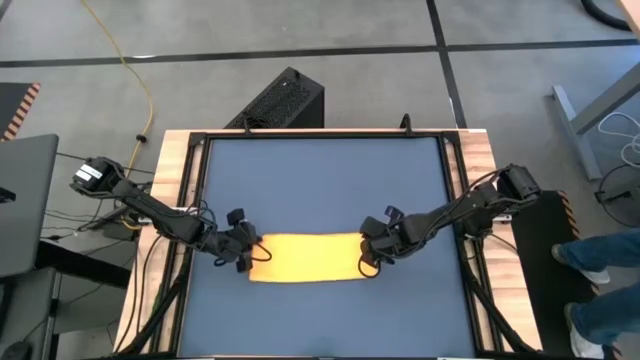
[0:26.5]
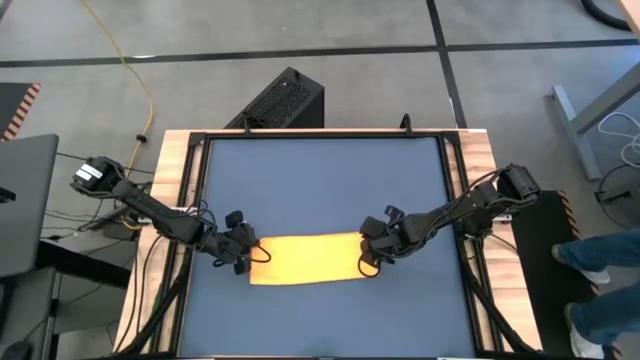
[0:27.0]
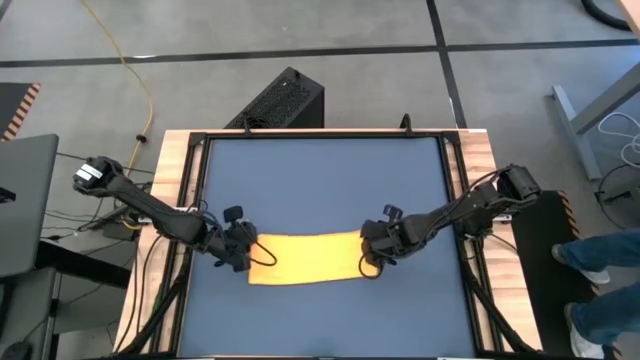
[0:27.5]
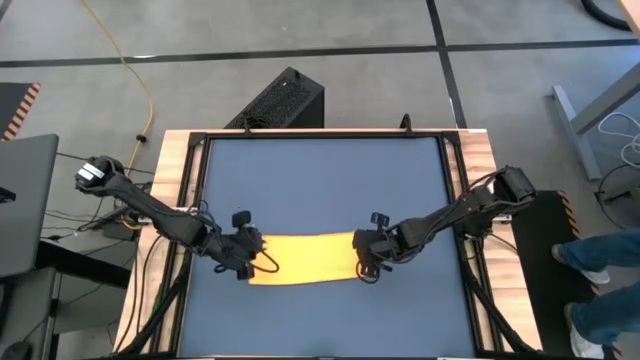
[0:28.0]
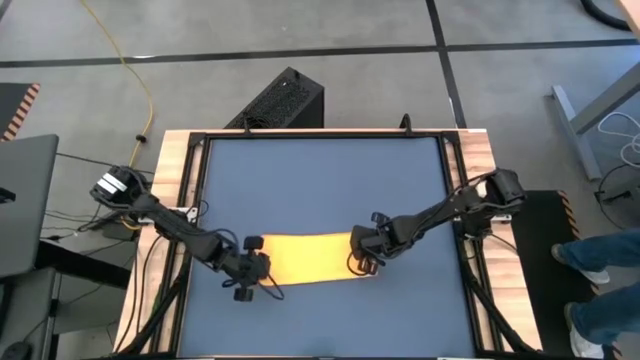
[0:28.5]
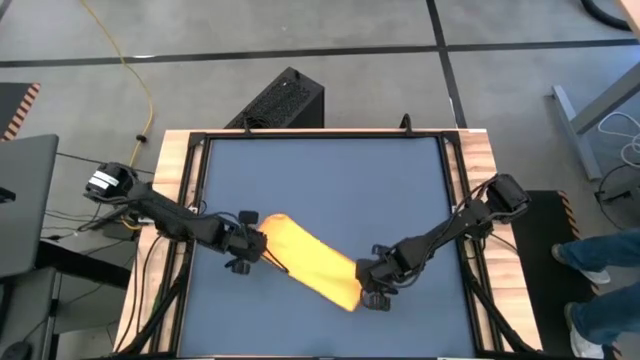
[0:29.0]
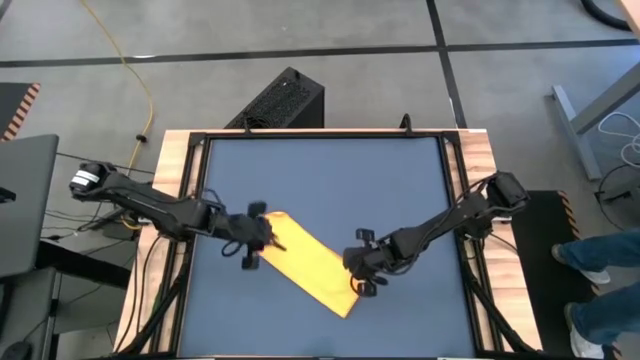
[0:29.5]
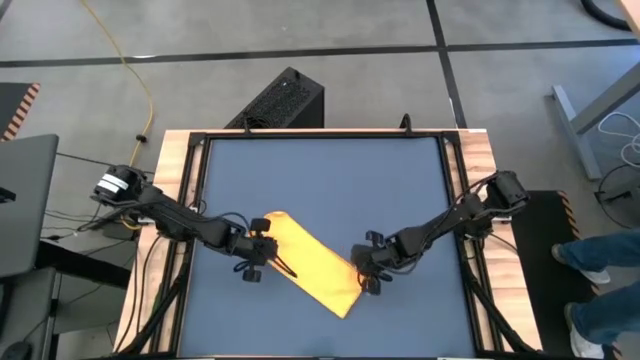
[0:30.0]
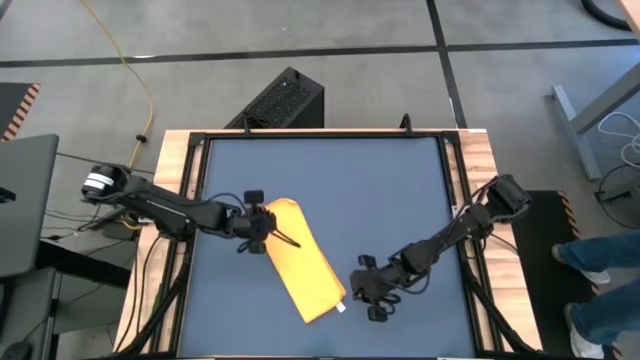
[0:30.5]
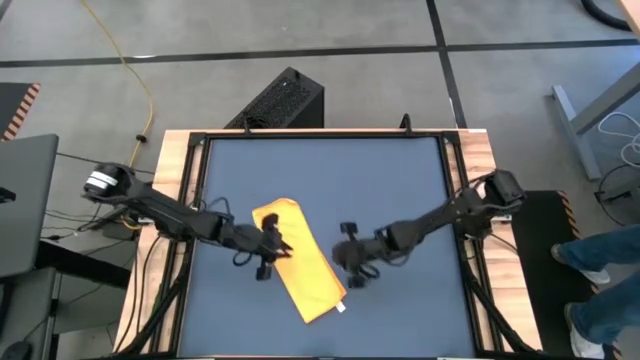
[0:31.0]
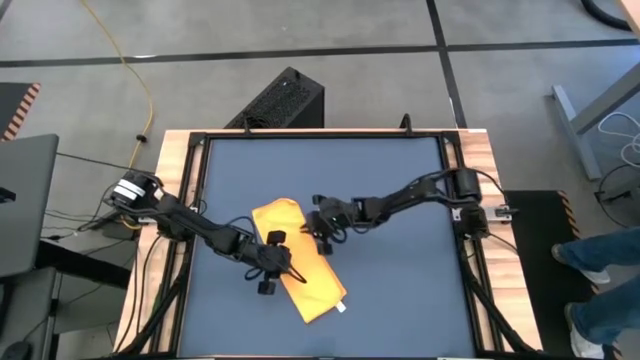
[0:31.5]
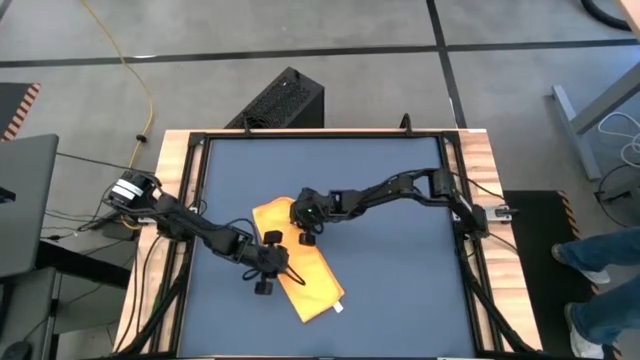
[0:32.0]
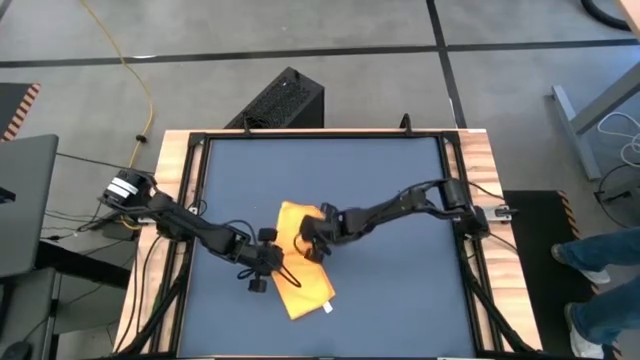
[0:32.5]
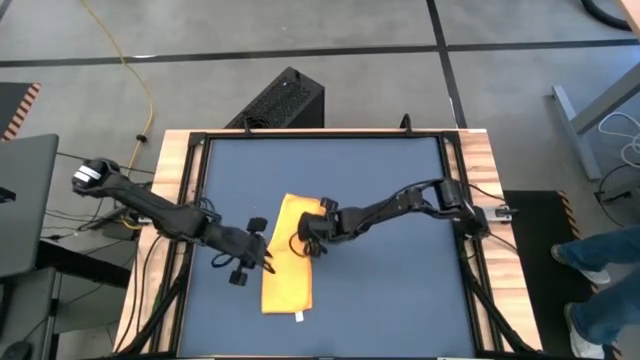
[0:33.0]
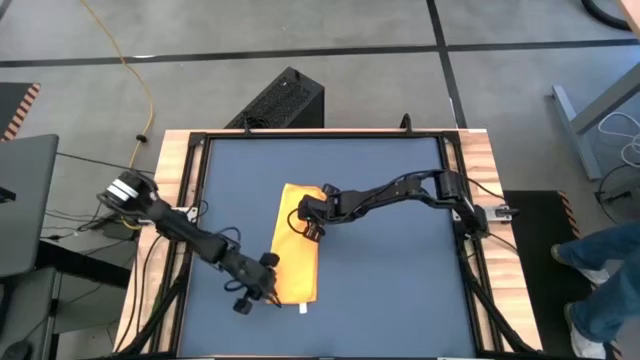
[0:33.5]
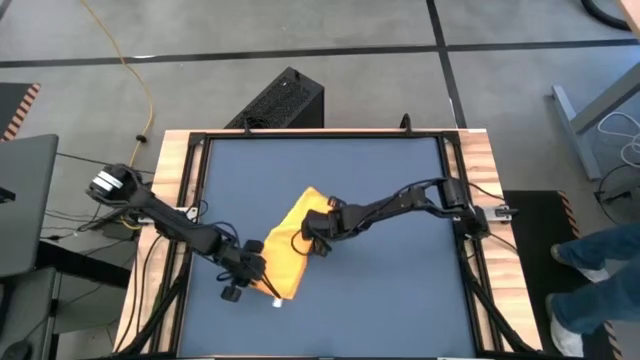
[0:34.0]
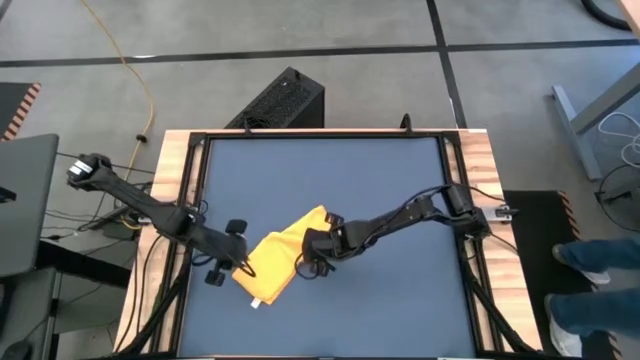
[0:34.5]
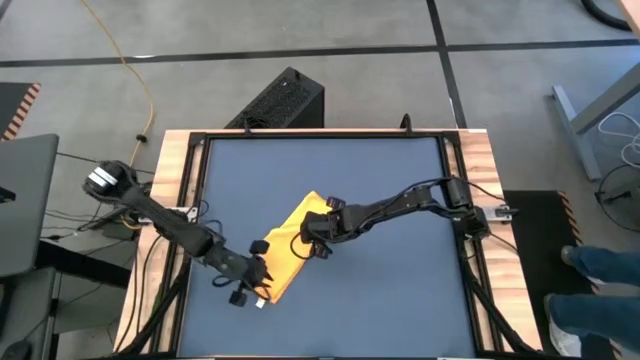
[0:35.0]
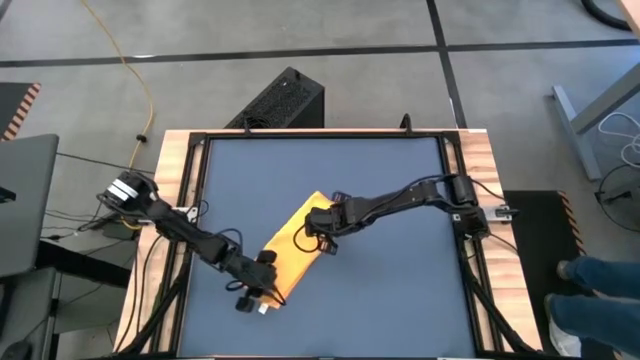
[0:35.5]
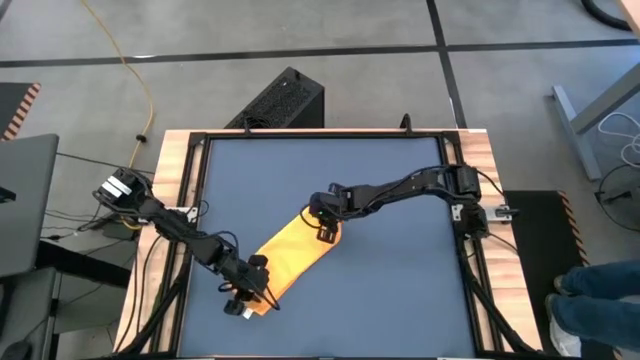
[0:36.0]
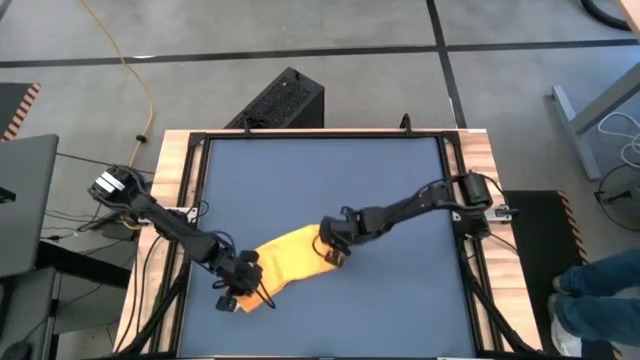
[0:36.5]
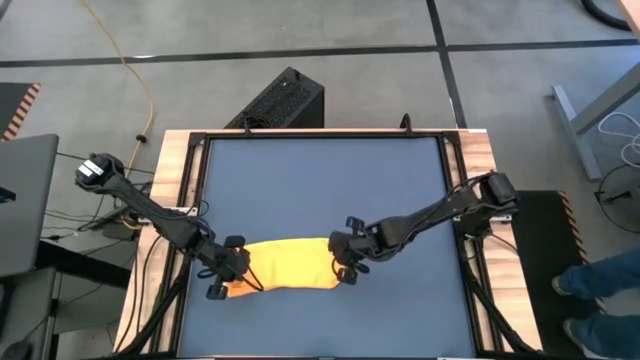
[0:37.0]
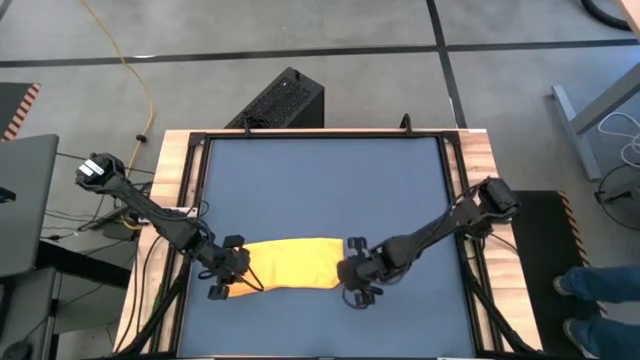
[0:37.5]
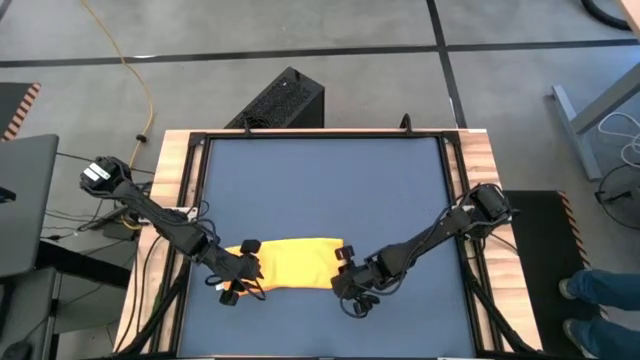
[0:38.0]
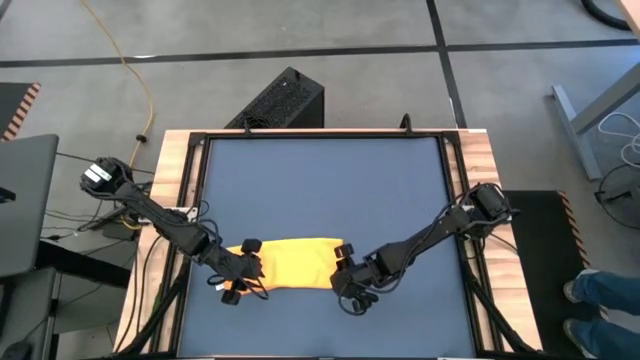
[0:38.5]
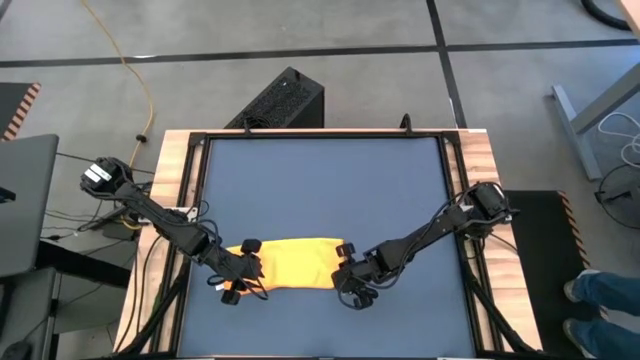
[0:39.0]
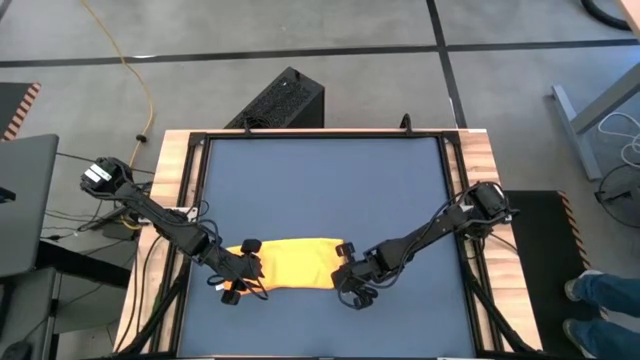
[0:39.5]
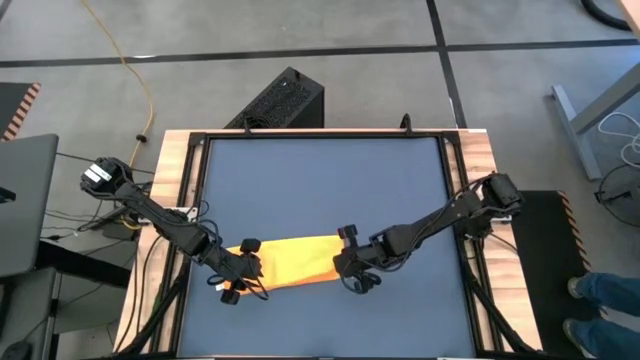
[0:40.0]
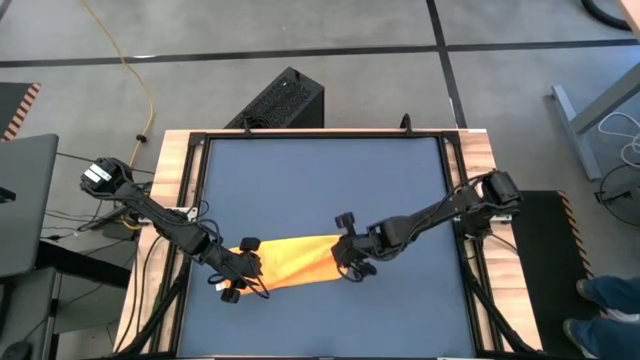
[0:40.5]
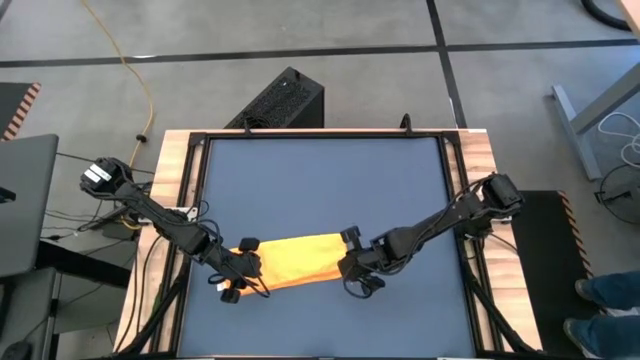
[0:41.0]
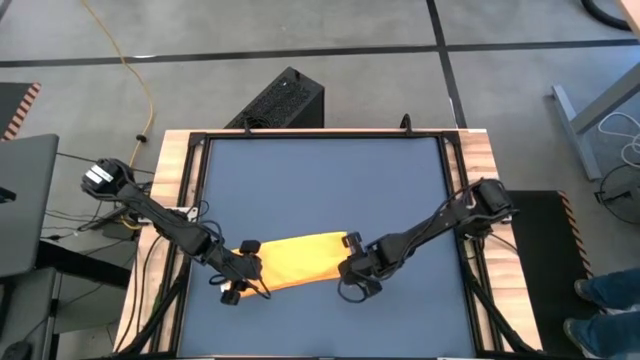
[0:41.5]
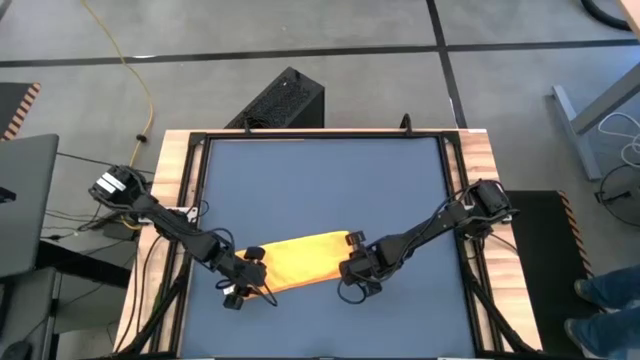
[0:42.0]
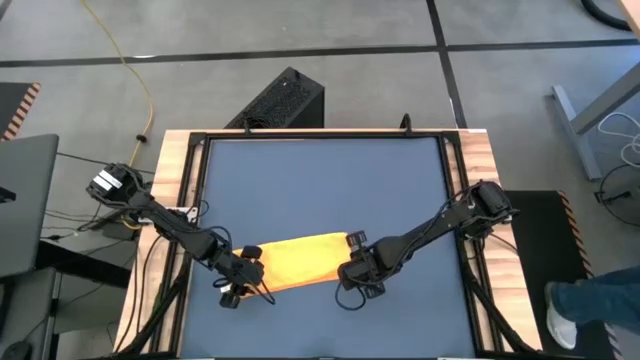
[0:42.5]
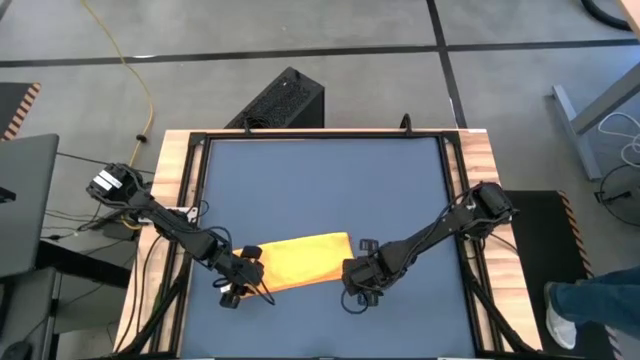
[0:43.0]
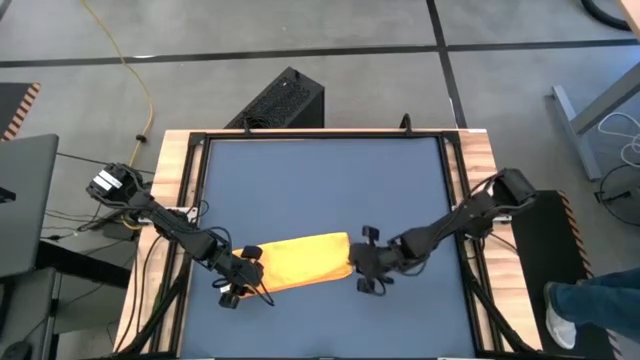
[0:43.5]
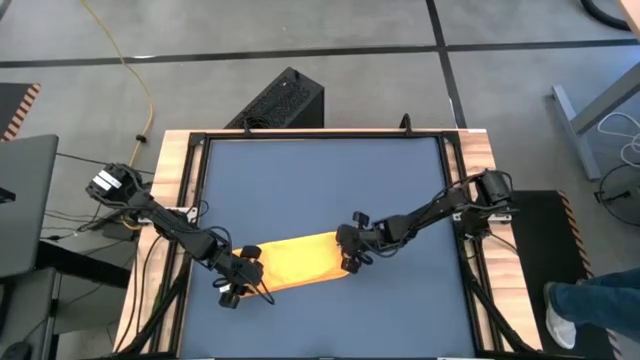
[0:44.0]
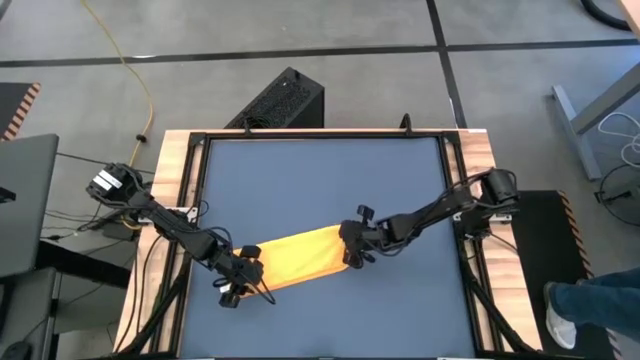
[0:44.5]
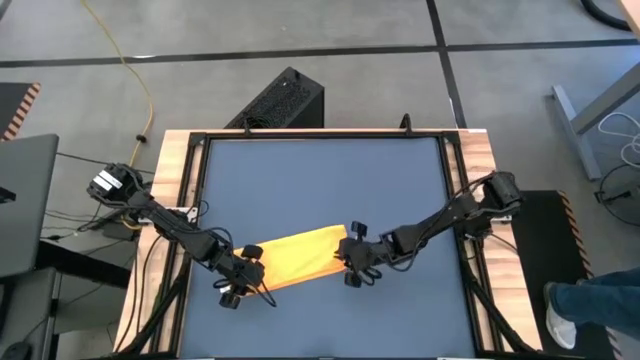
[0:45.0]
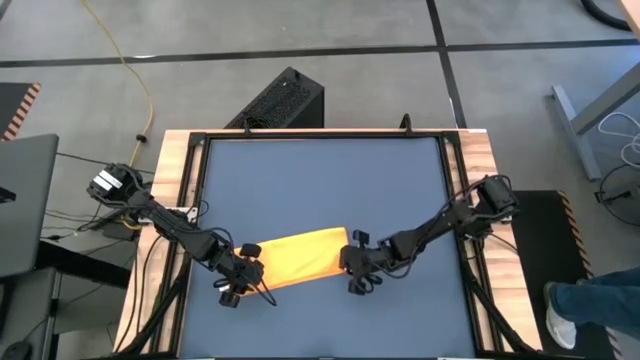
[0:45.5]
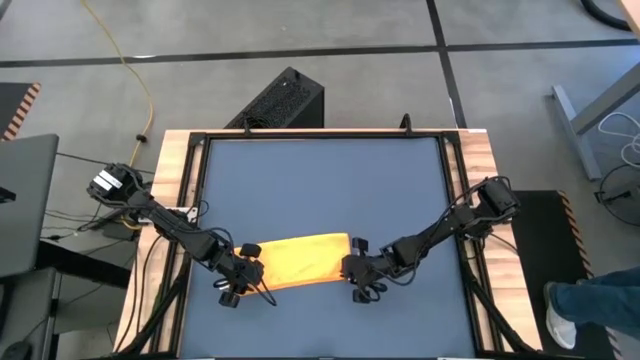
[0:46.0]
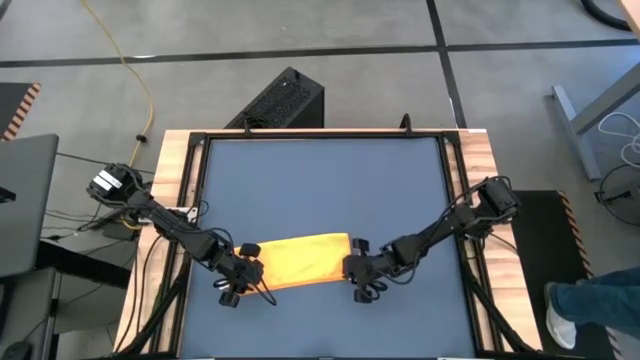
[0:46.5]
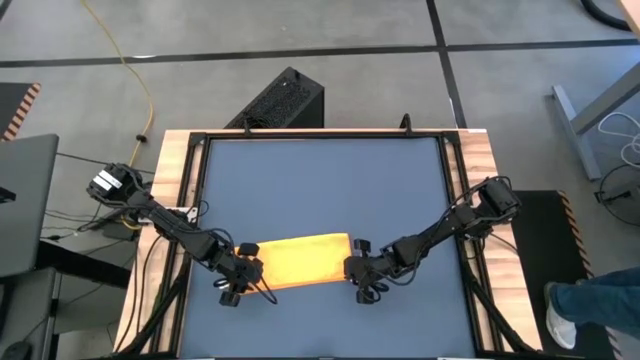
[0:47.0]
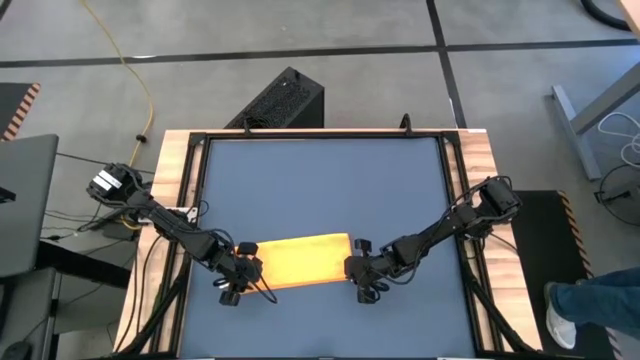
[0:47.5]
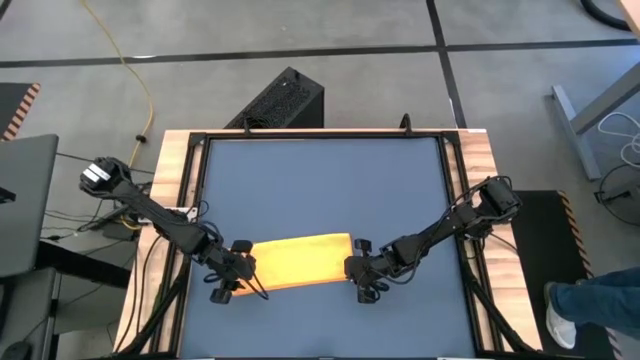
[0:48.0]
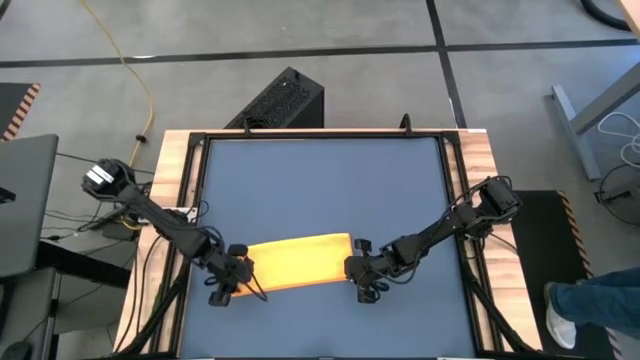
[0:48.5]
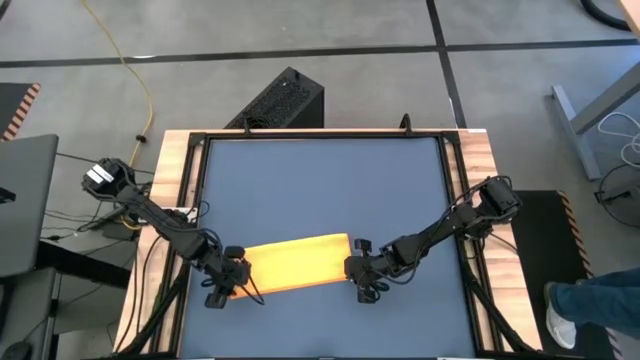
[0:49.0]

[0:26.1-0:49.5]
Task: Roll towel into tight, uniform cylinder
Roll the orange towel
